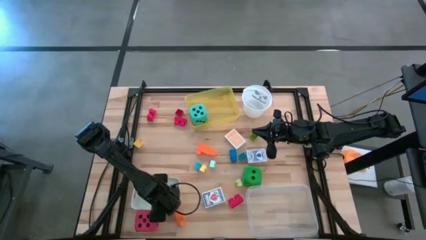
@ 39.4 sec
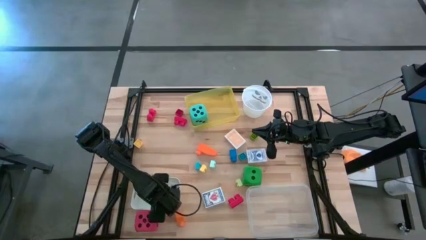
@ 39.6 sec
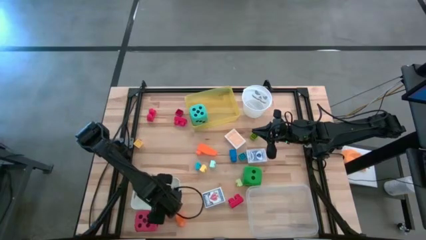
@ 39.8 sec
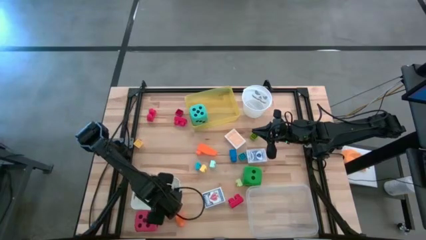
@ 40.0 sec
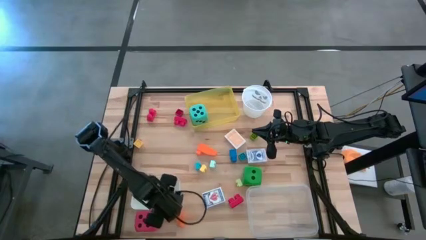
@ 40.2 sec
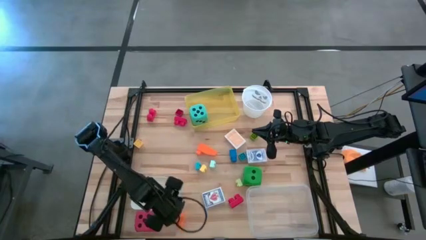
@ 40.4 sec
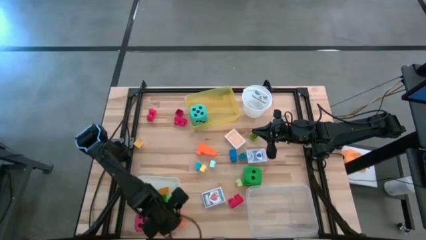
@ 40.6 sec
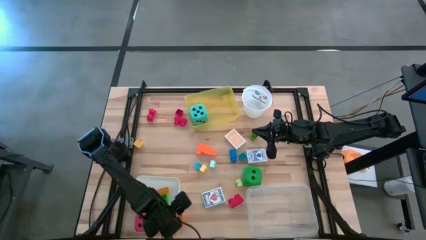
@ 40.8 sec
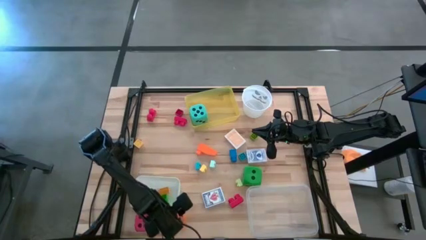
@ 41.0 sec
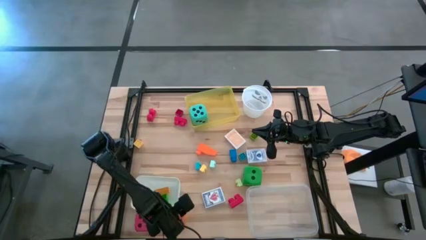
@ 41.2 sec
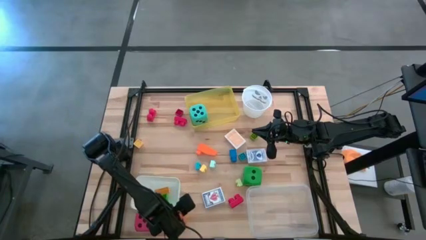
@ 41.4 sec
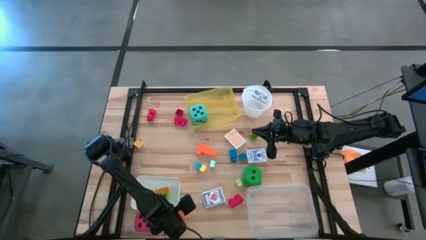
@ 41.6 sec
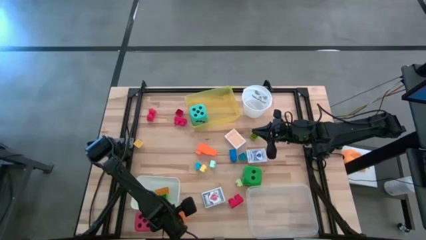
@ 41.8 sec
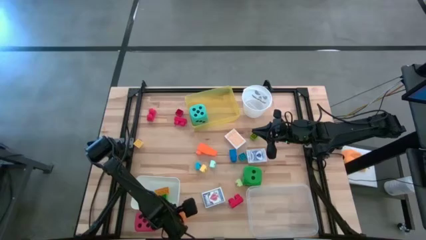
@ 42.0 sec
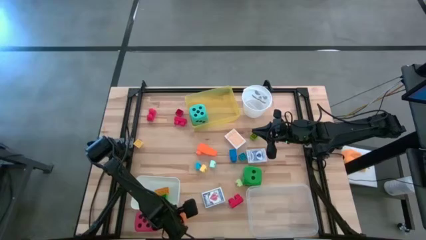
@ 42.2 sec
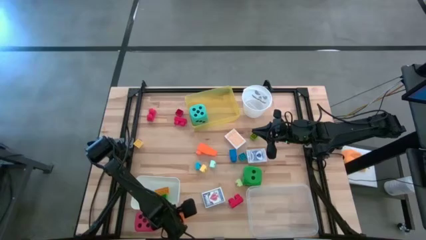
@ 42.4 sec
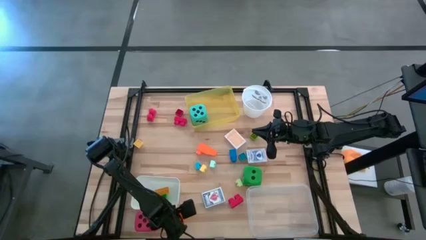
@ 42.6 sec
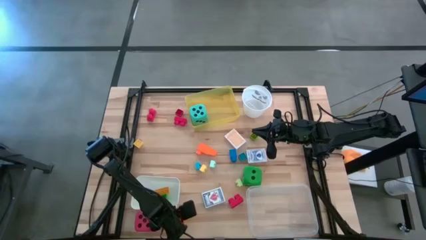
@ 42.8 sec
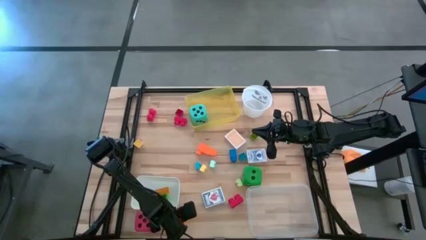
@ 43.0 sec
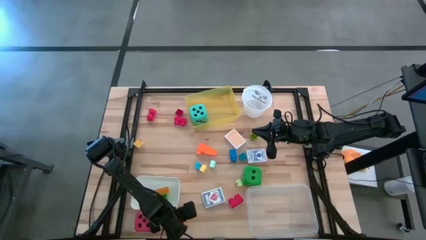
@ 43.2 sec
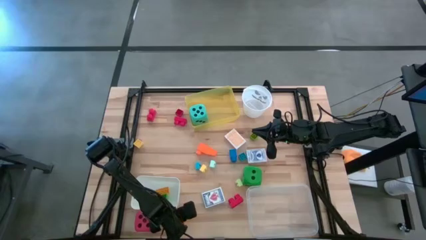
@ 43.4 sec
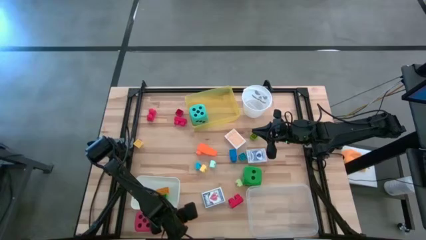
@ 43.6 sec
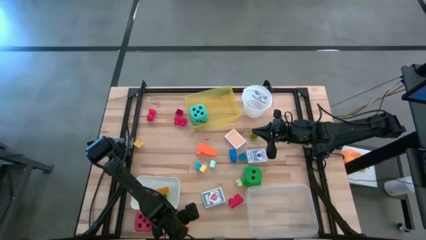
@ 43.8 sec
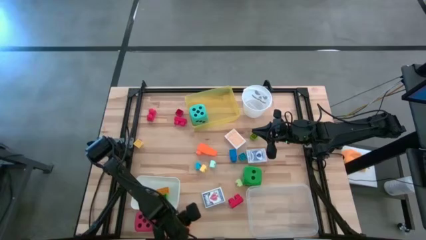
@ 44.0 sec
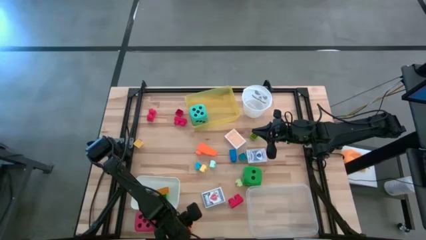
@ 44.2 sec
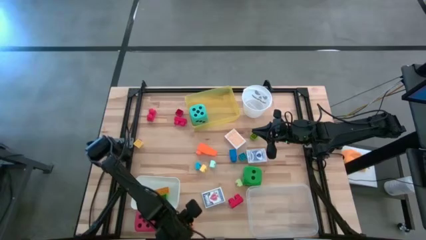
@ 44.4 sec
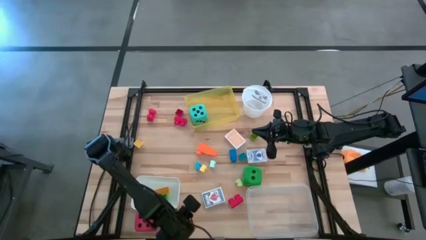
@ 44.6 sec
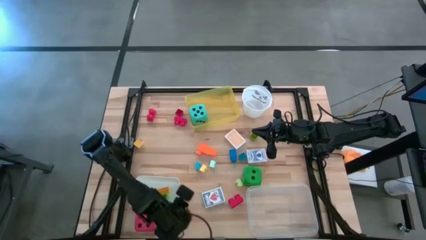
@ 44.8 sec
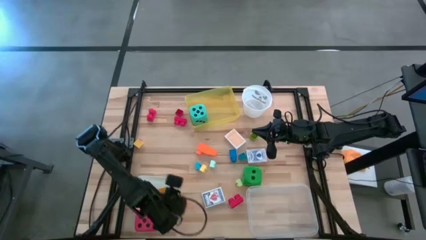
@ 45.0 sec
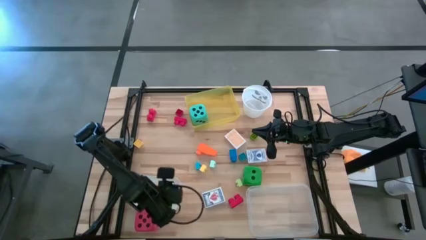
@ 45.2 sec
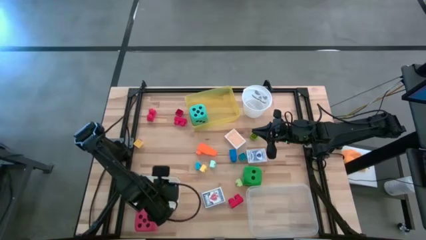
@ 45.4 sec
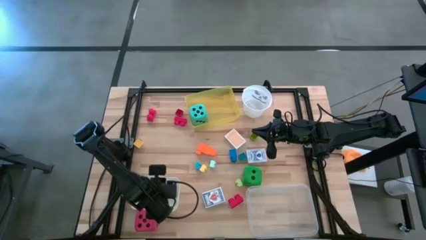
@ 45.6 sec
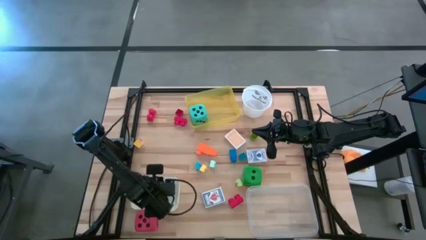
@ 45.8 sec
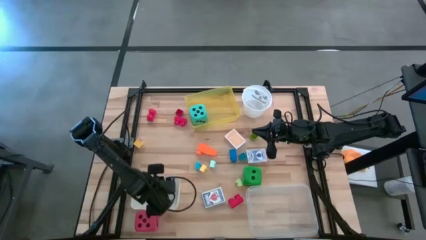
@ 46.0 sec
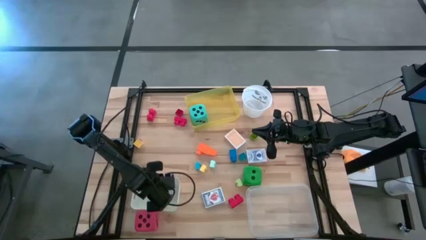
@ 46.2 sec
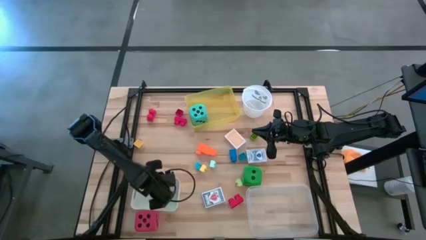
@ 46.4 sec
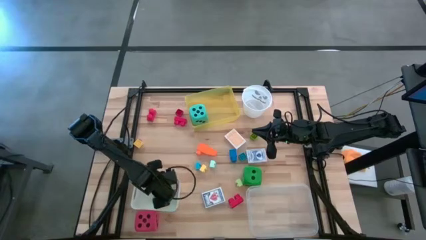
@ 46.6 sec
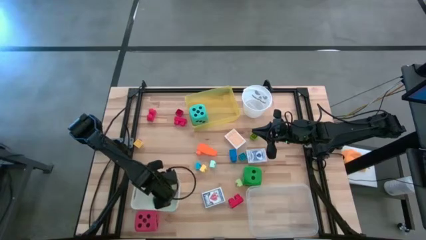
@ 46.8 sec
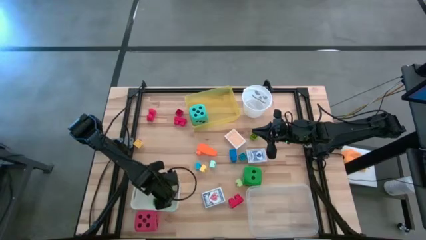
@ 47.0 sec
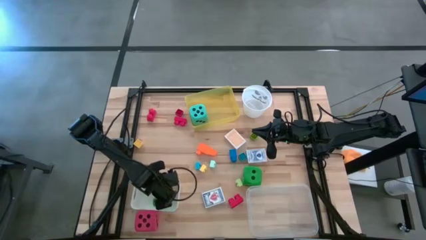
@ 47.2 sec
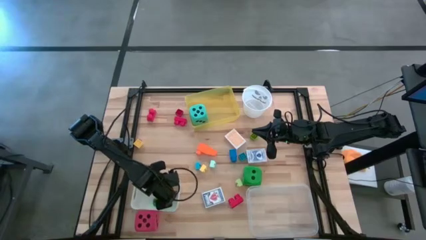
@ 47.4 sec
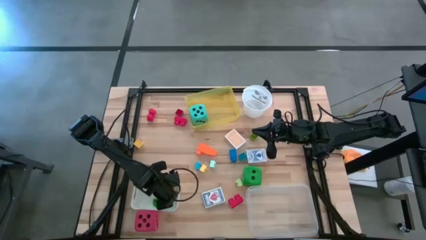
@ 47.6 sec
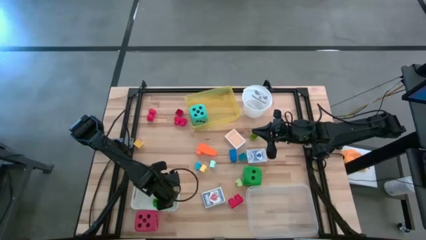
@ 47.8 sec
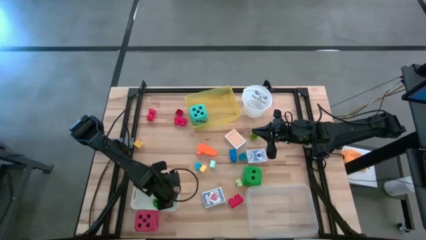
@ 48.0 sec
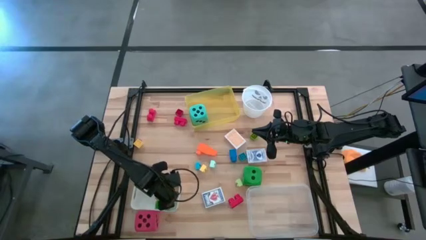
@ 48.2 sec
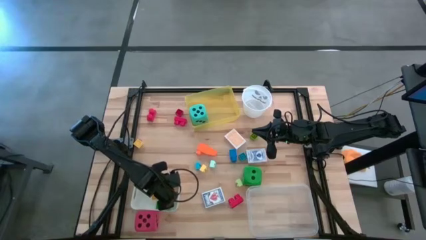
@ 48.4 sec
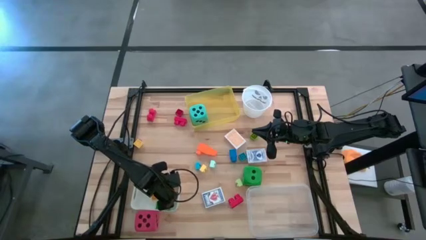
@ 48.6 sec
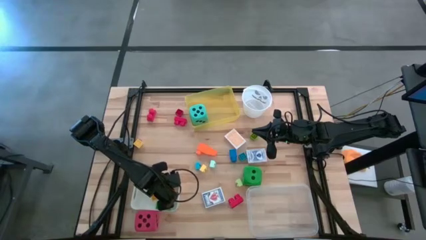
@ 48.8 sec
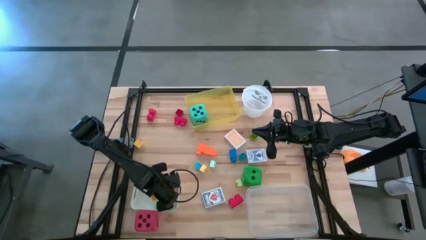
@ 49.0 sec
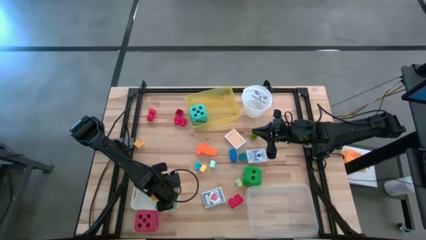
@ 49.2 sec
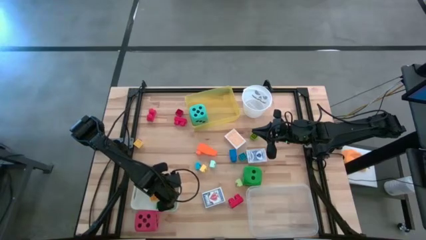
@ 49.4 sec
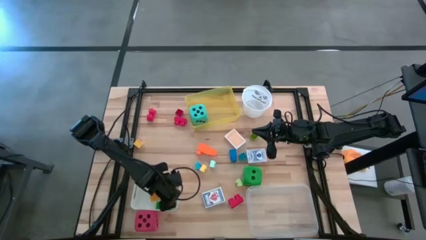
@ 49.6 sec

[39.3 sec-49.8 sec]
Task: Pick & Place Toys
Put the bottom orange game piece into the white bin
